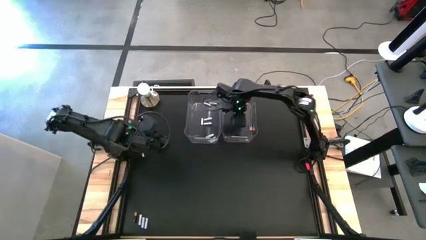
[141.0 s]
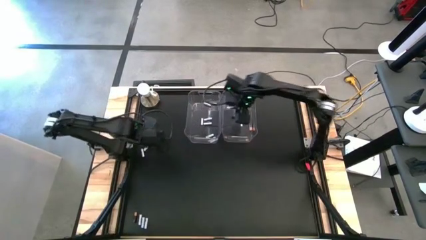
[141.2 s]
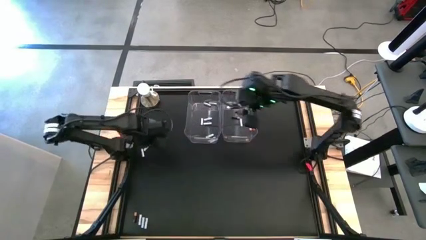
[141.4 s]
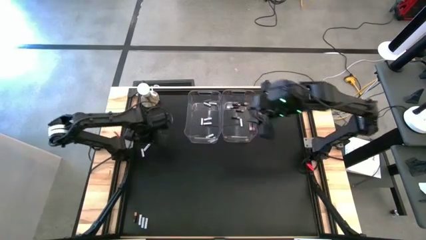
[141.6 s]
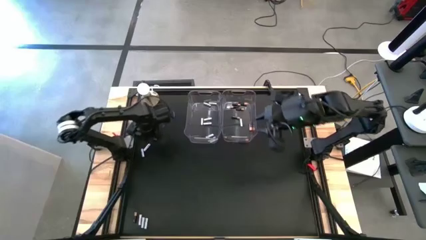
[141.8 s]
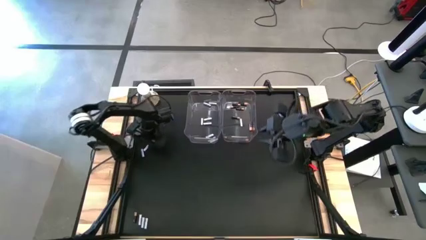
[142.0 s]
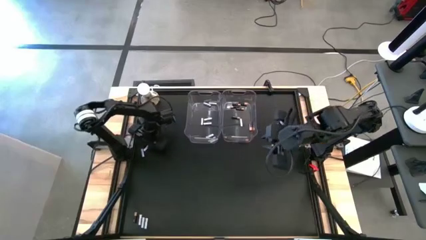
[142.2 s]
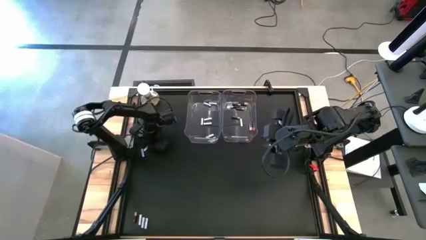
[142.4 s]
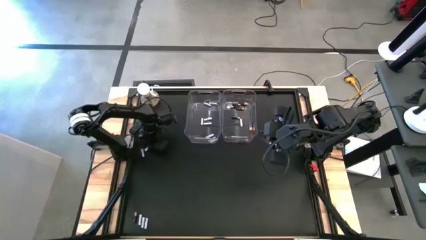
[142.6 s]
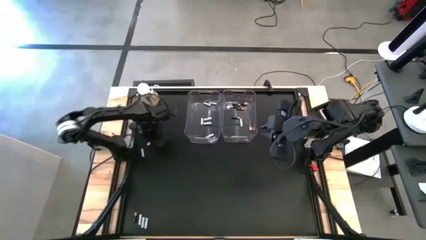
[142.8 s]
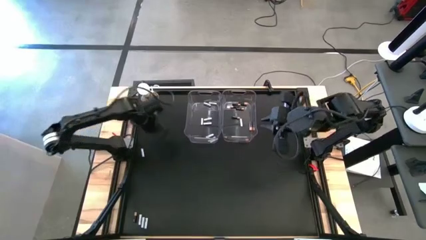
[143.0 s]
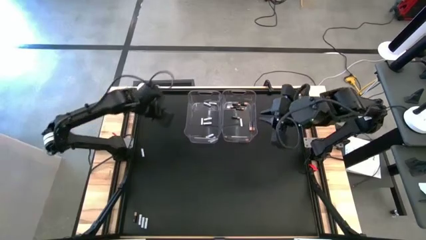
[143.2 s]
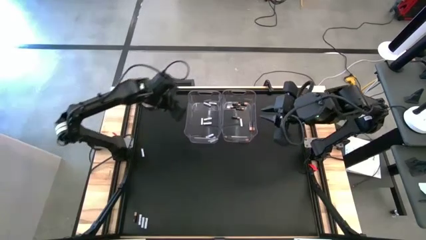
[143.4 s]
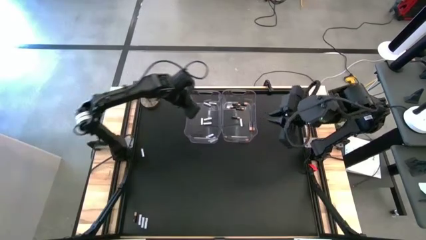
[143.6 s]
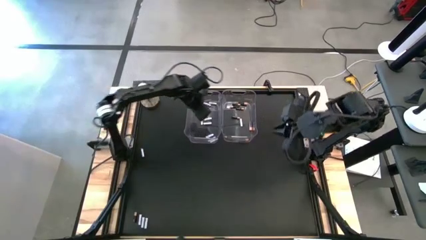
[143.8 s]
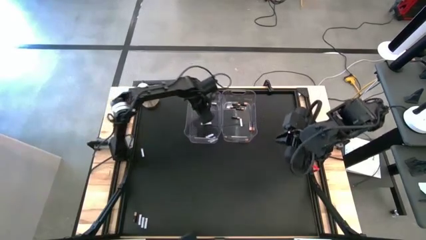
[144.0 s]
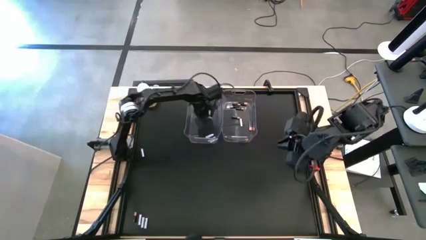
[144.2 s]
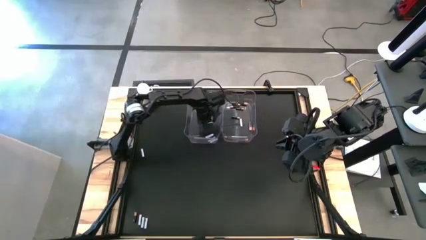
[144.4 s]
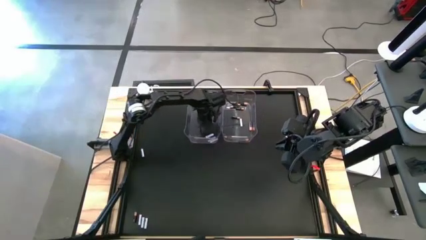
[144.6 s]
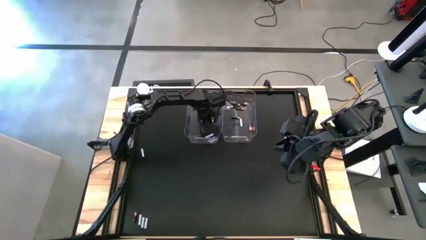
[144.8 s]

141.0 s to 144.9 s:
Task: Sort batteries
Put the white battery into the left transparent bin

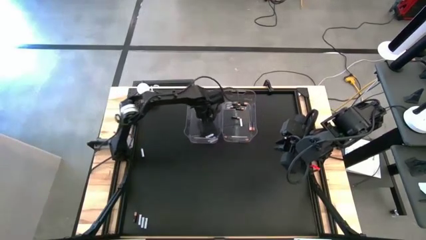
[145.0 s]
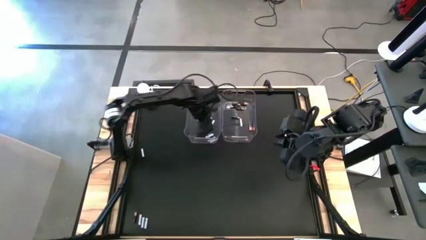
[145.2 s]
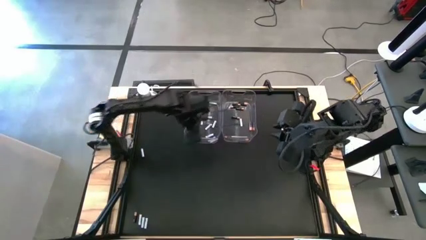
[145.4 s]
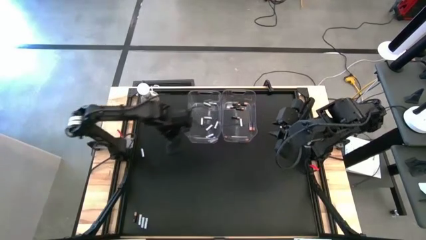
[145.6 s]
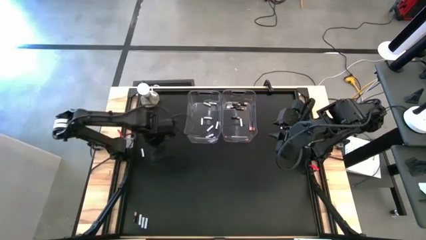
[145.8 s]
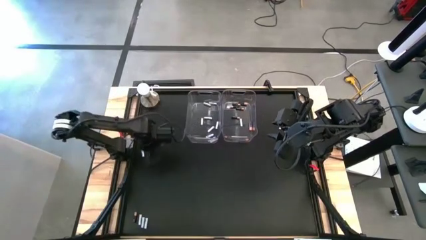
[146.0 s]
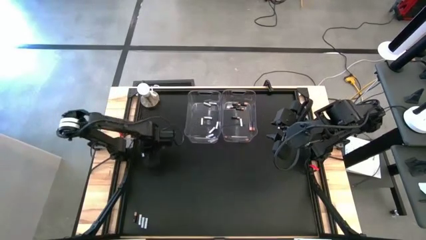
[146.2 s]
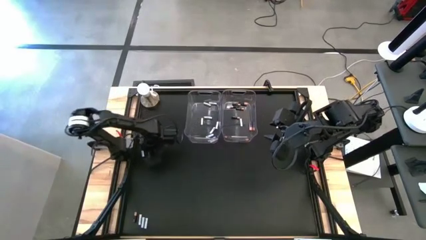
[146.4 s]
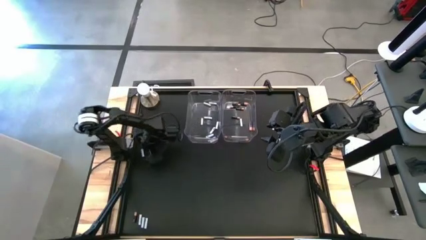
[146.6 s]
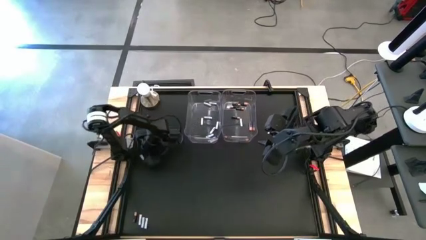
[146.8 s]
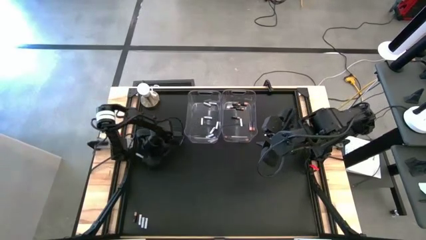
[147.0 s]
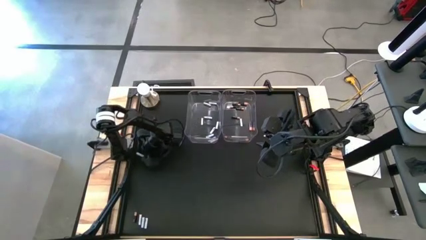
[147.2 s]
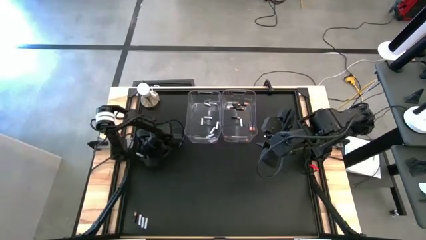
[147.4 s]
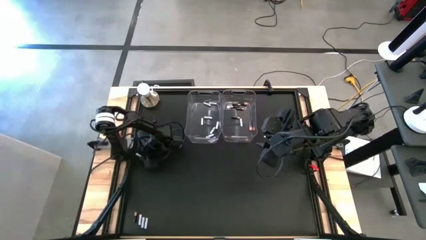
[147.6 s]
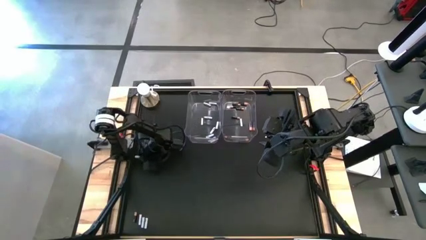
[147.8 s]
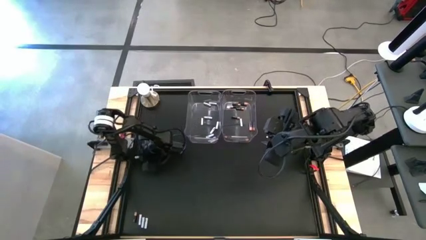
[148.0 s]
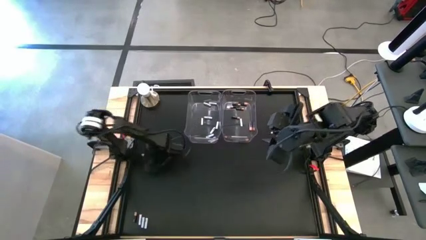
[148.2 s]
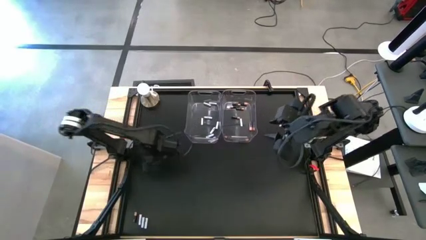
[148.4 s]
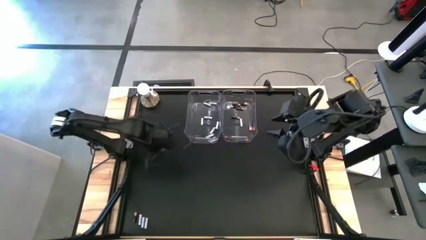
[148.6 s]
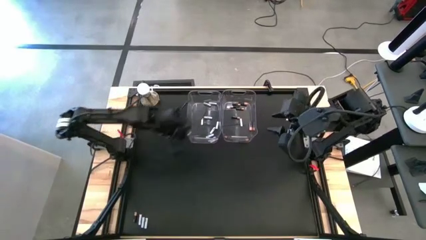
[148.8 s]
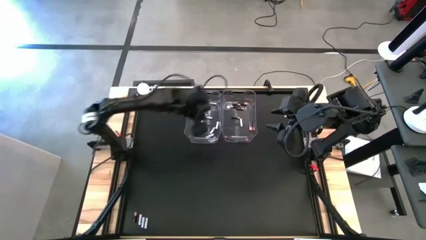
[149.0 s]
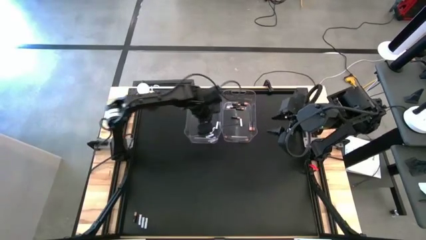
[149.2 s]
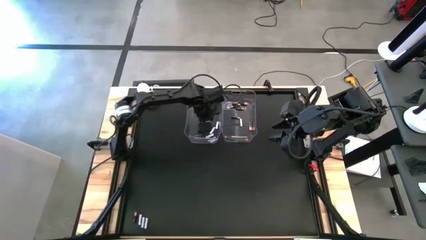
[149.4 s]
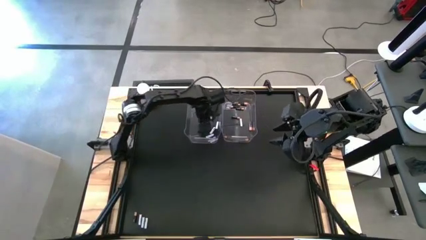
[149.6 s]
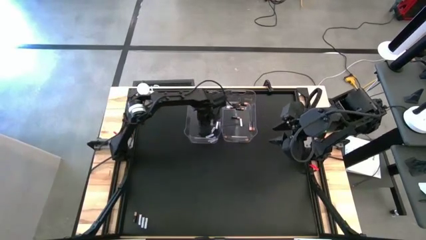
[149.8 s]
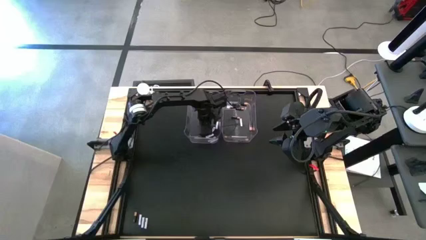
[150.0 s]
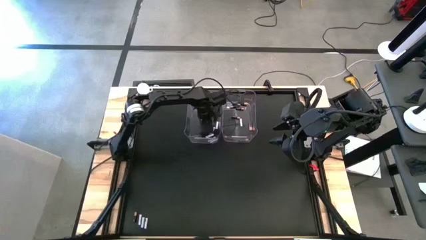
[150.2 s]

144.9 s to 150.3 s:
Put the white battery into the left transparent bin

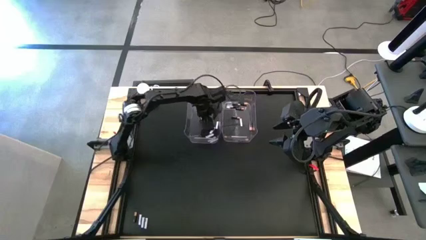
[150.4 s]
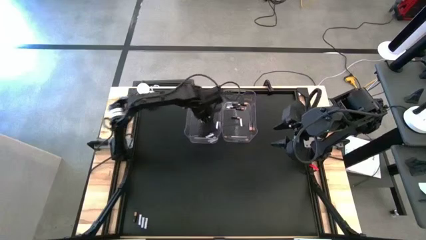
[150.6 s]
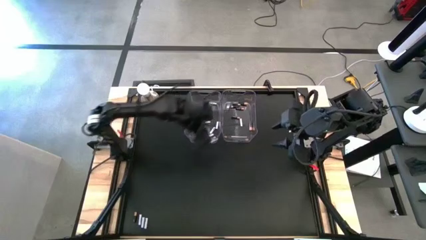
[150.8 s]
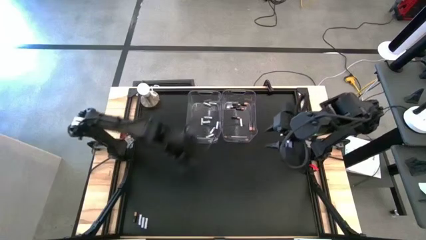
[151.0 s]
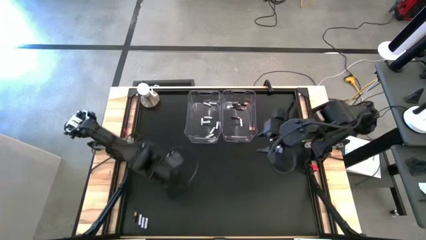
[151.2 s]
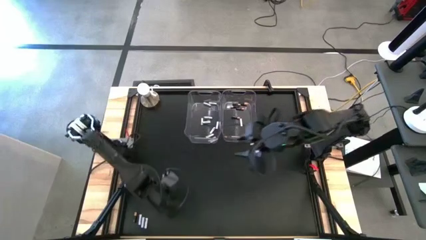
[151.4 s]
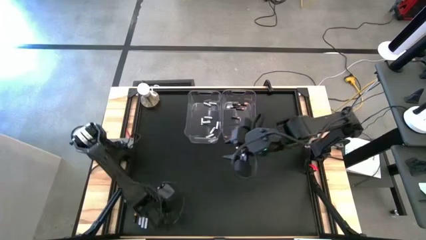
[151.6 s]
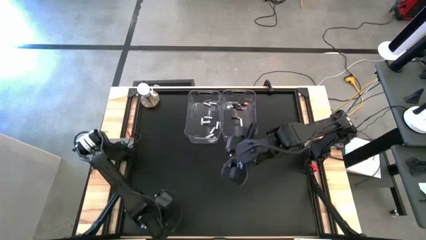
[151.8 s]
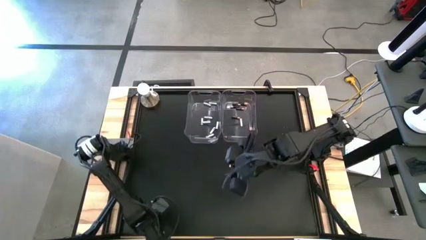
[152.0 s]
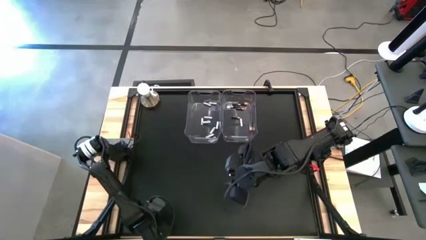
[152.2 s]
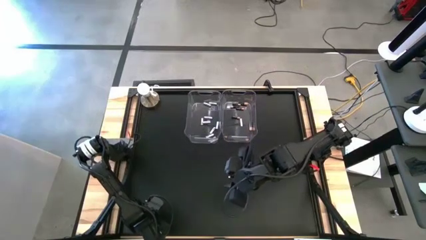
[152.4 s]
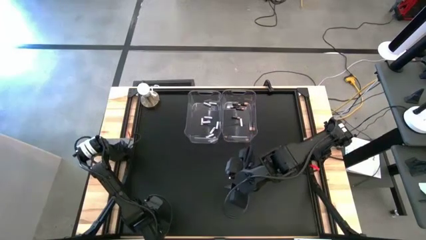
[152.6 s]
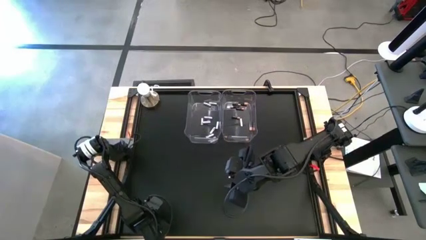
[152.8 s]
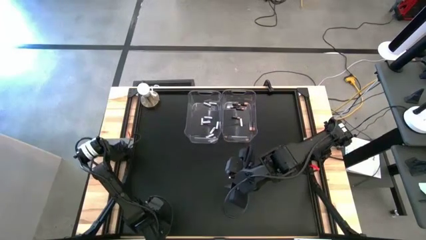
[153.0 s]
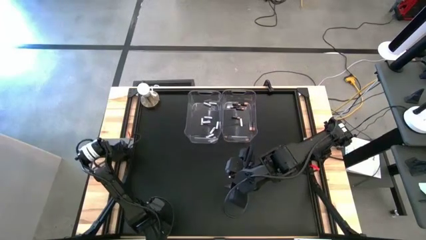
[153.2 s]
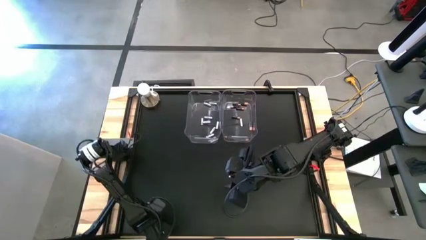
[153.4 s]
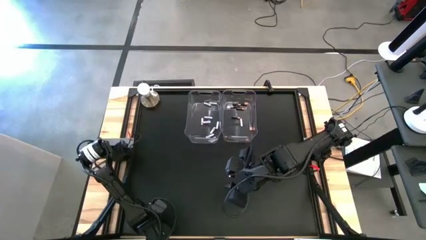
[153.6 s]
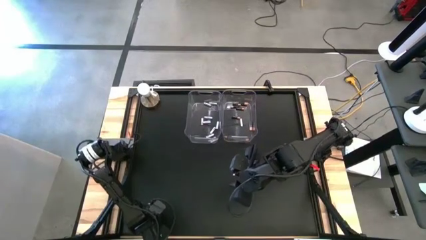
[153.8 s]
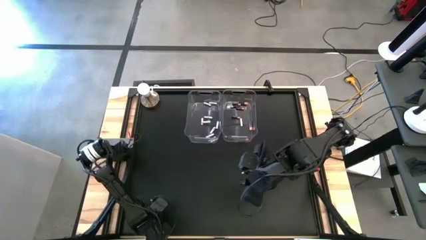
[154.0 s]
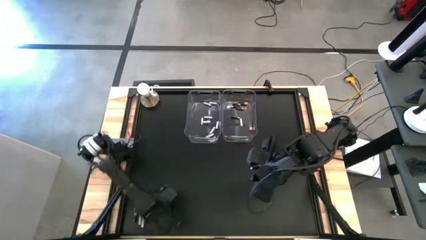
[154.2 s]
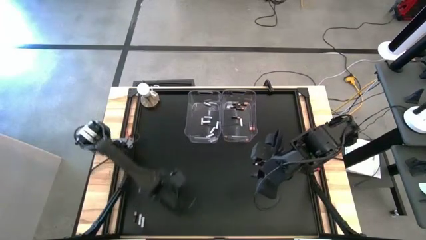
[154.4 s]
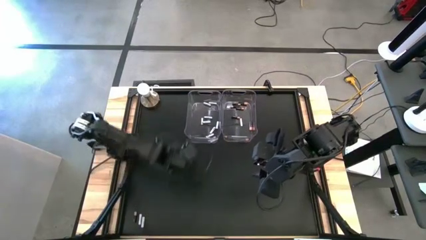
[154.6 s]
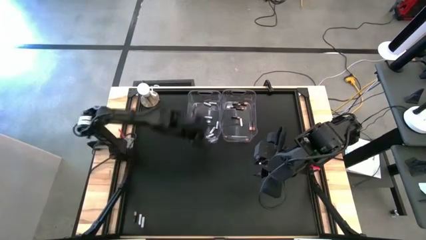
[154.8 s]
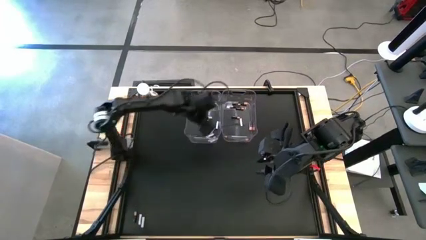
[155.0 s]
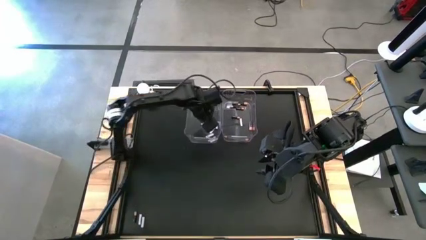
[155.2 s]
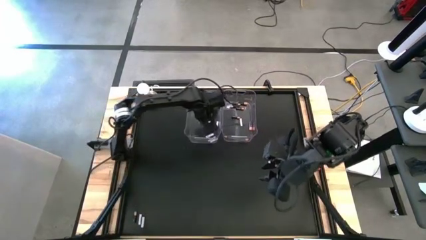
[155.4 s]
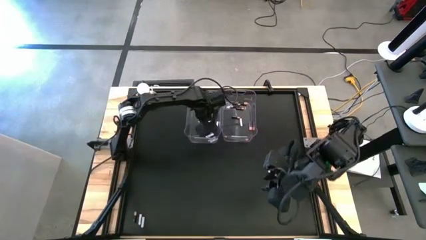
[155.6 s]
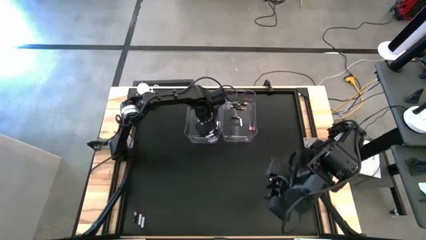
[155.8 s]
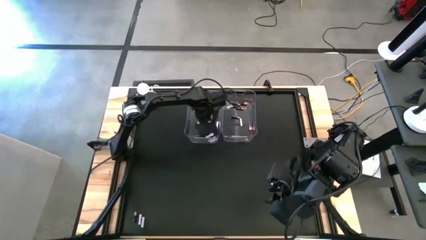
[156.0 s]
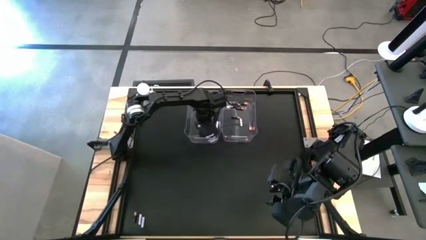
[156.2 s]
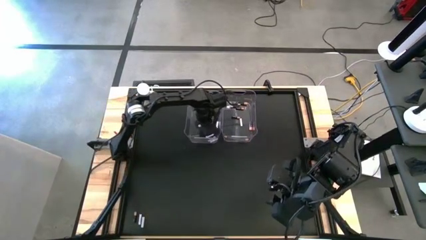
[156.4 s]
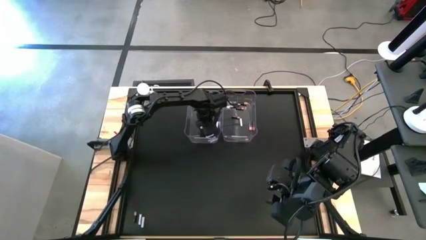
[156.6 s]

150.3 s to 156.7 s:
Put the white battery into the left transparent bin
